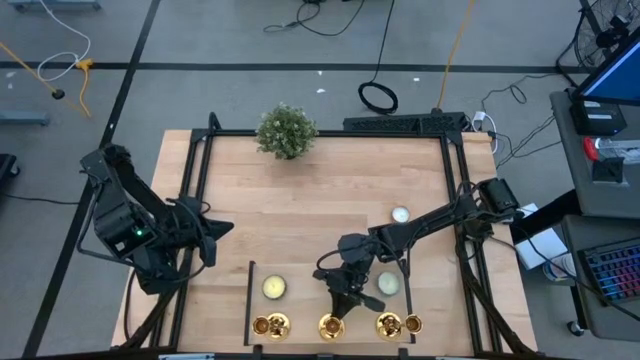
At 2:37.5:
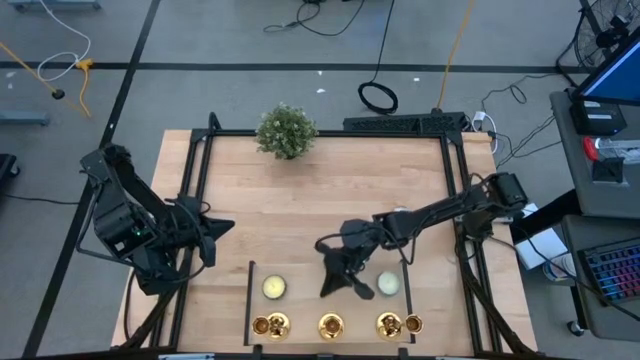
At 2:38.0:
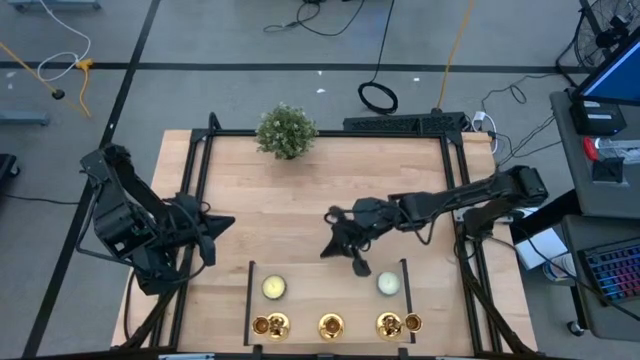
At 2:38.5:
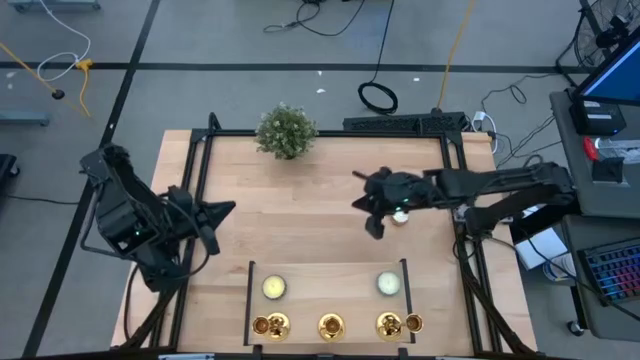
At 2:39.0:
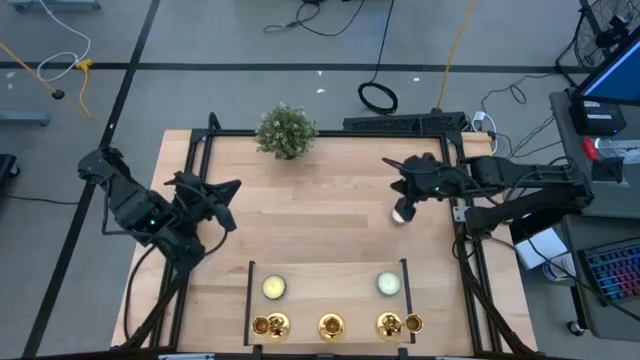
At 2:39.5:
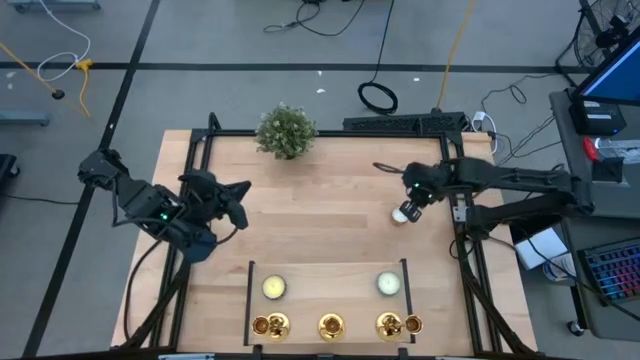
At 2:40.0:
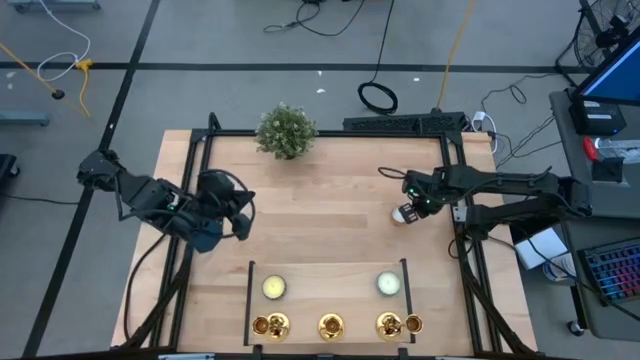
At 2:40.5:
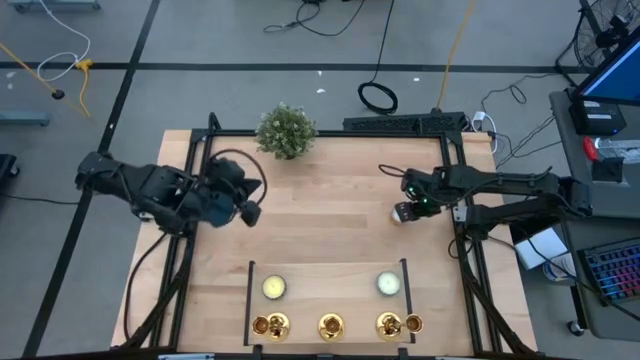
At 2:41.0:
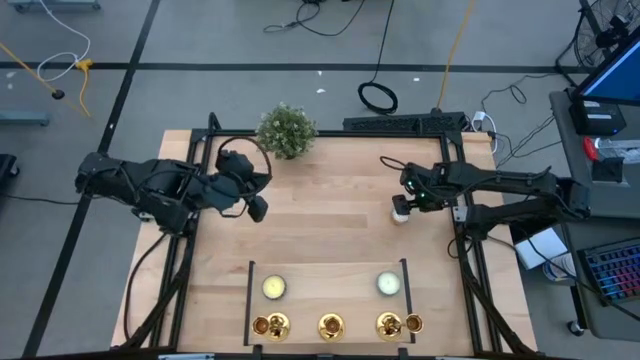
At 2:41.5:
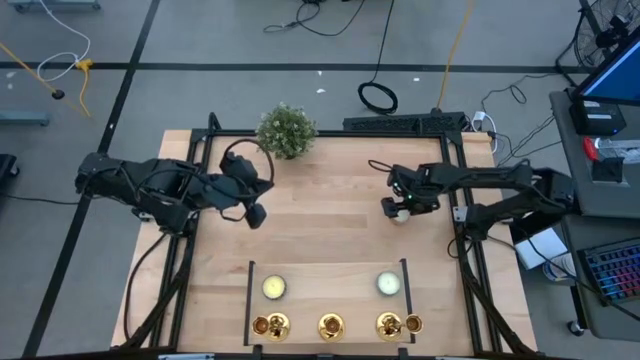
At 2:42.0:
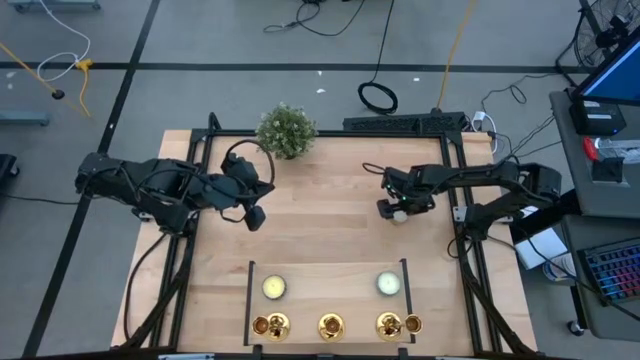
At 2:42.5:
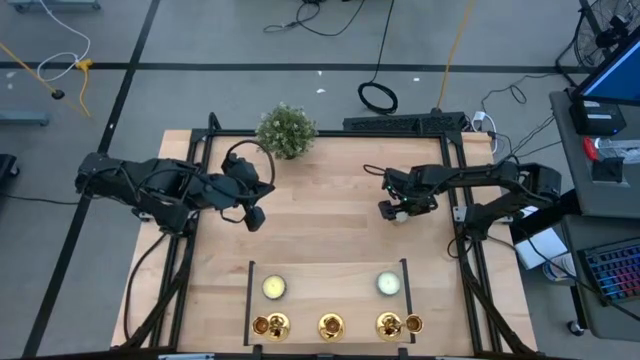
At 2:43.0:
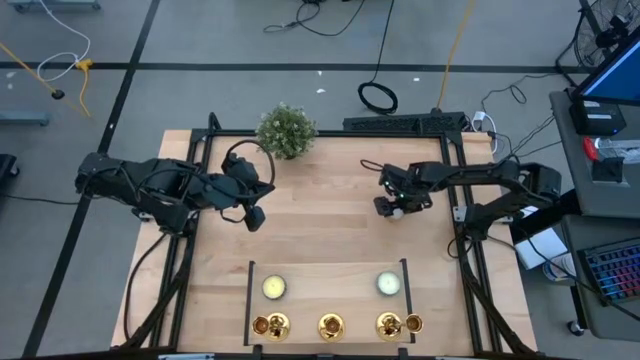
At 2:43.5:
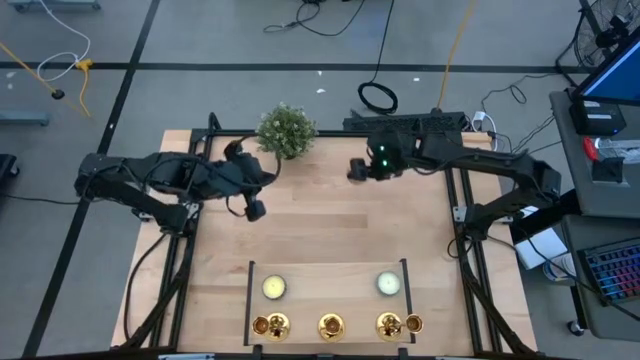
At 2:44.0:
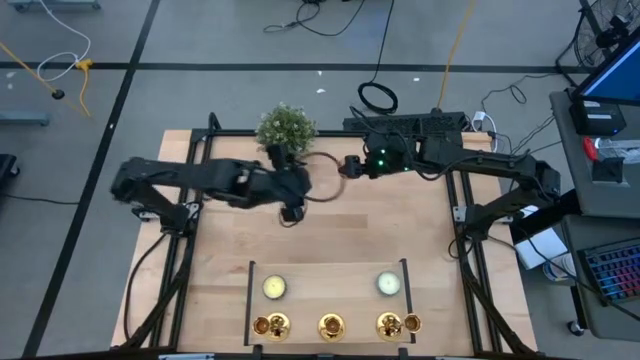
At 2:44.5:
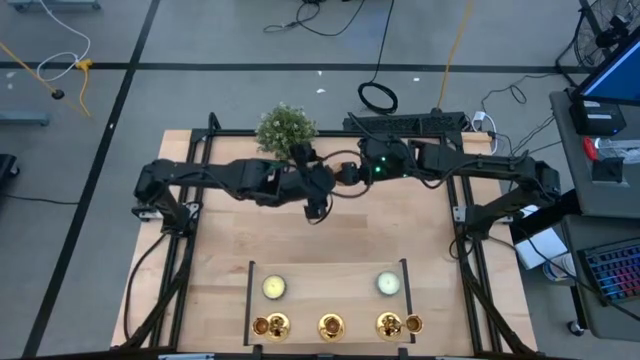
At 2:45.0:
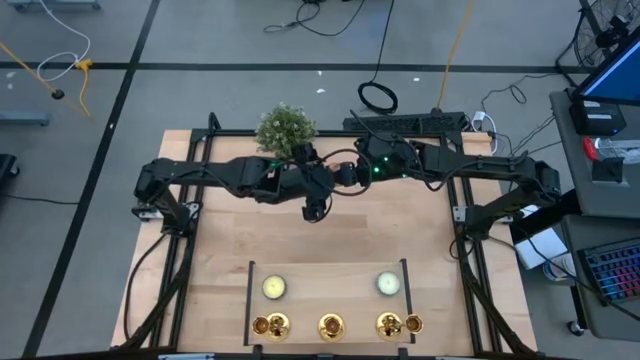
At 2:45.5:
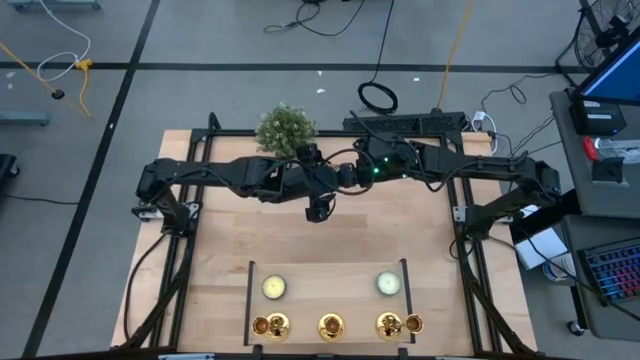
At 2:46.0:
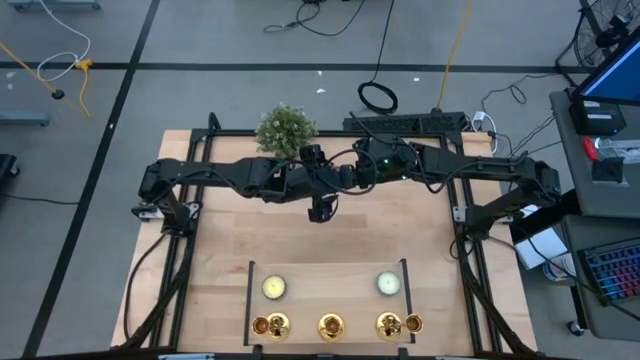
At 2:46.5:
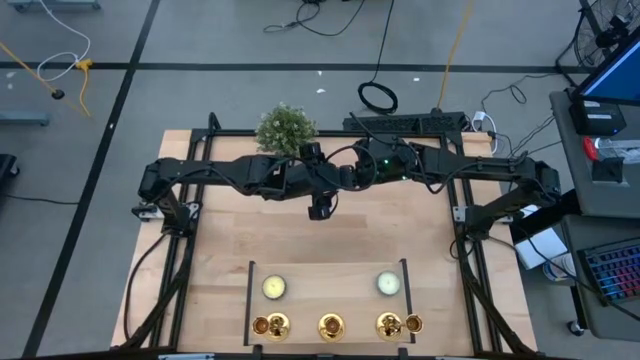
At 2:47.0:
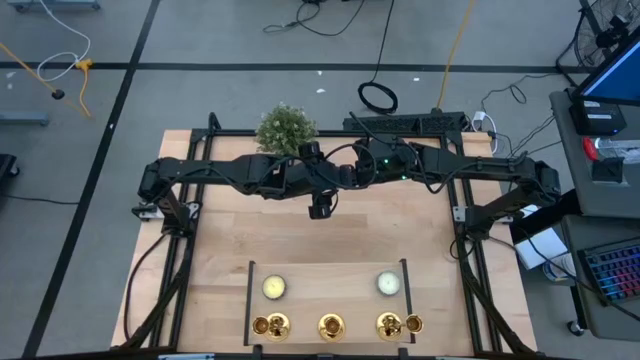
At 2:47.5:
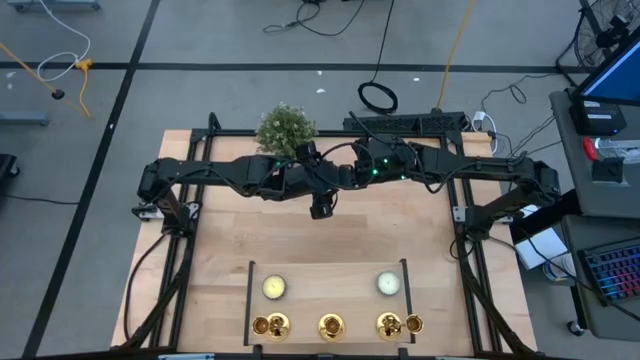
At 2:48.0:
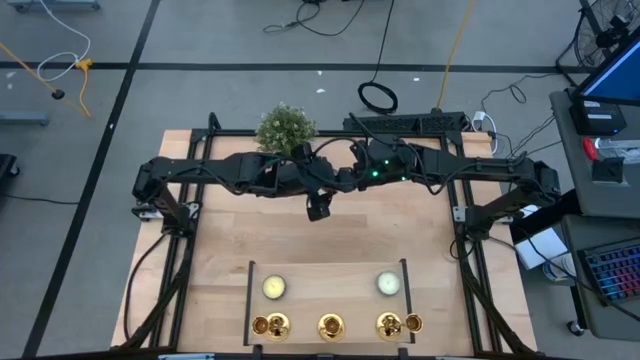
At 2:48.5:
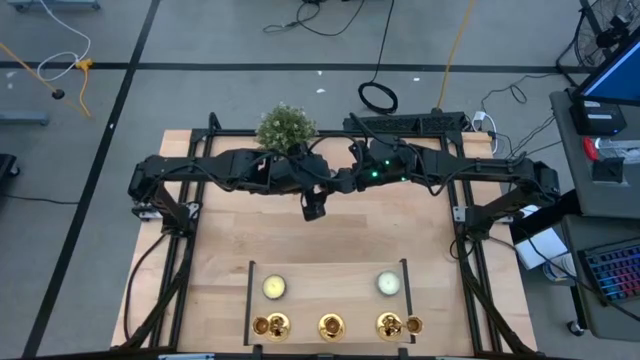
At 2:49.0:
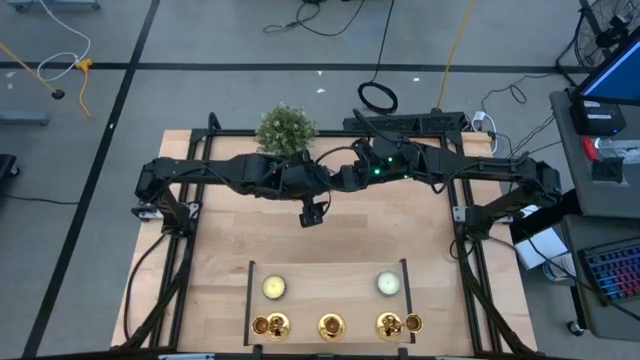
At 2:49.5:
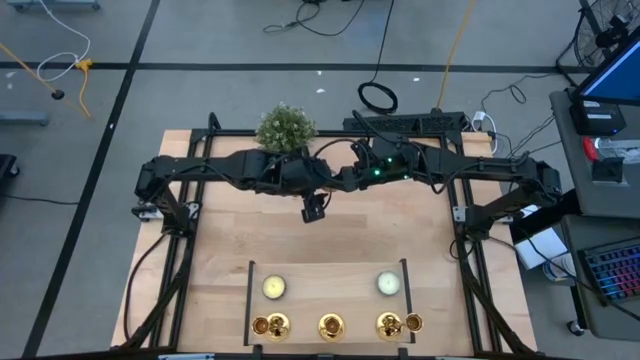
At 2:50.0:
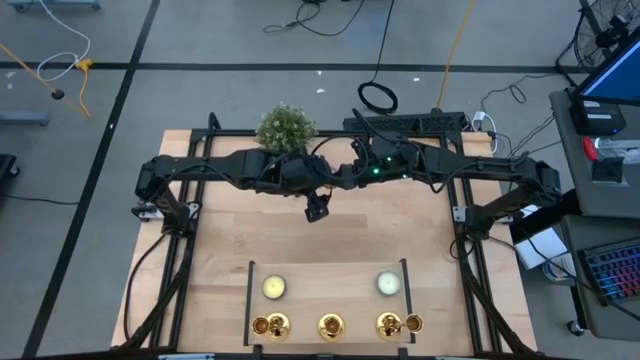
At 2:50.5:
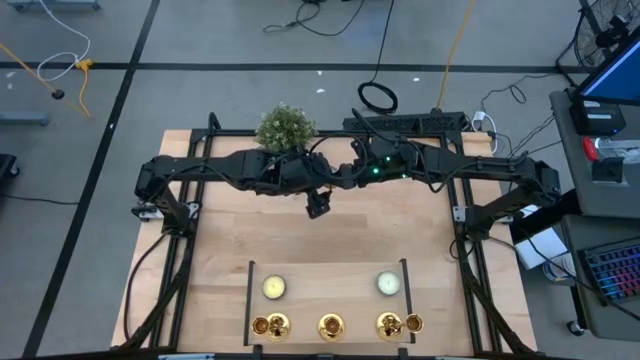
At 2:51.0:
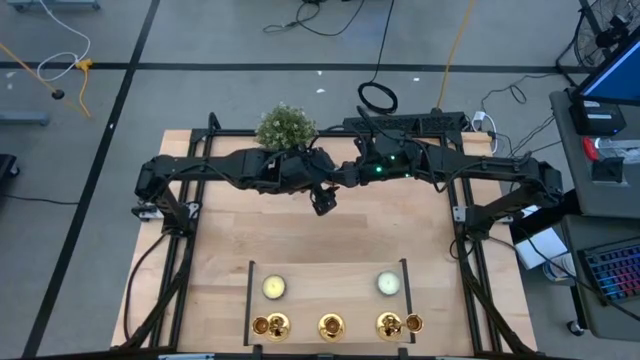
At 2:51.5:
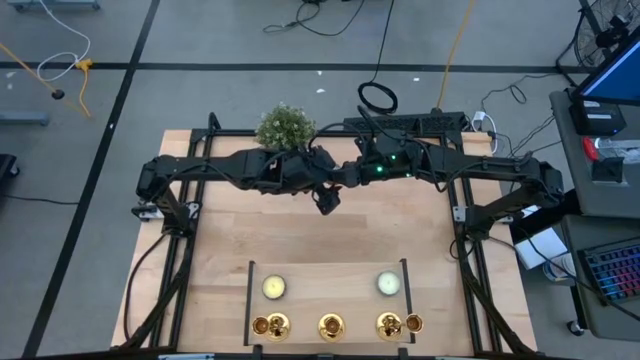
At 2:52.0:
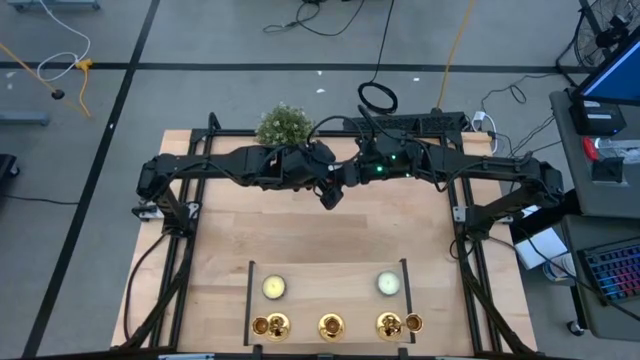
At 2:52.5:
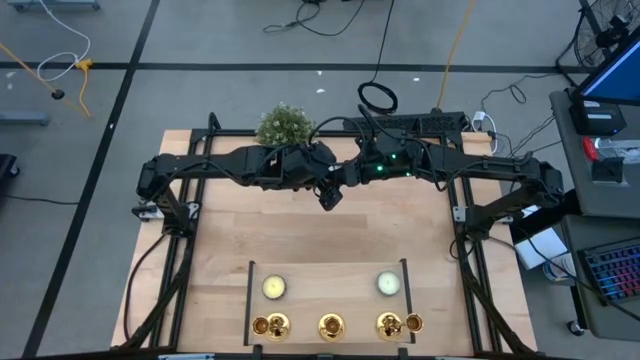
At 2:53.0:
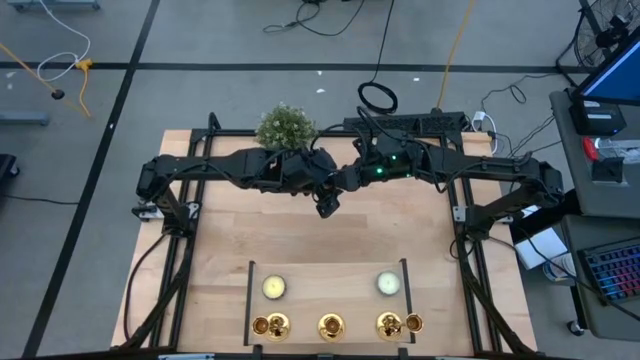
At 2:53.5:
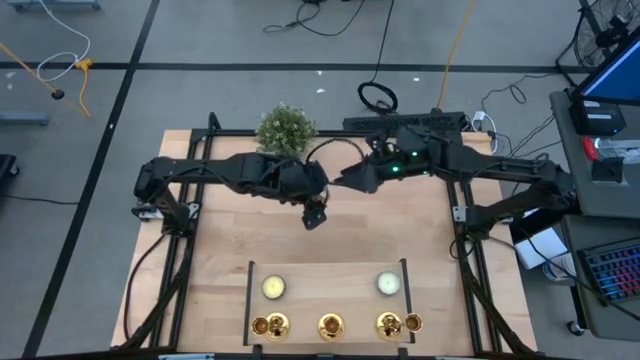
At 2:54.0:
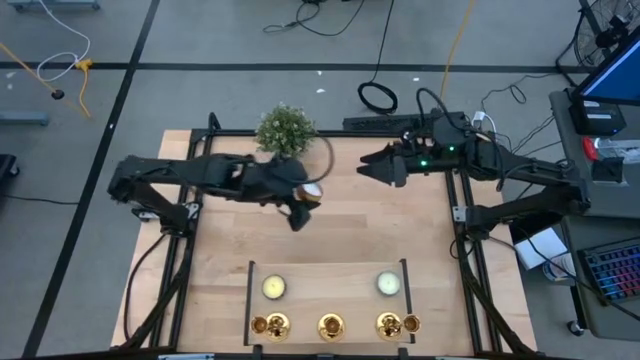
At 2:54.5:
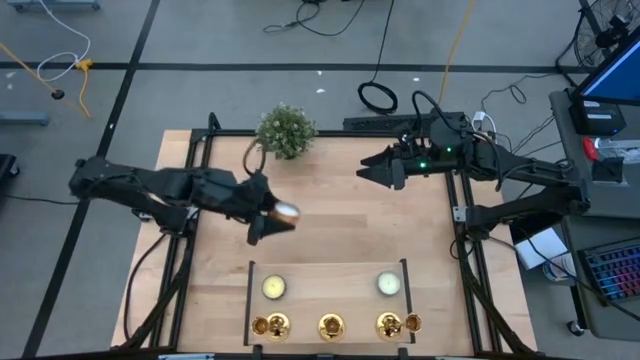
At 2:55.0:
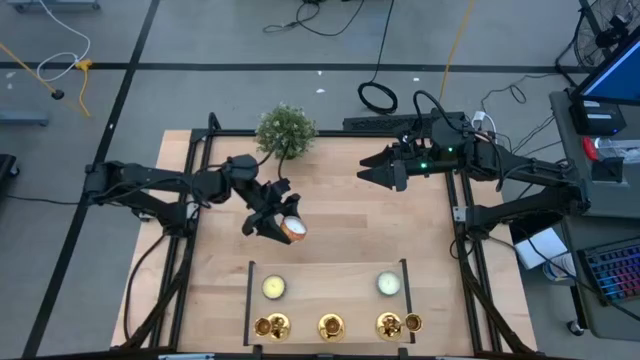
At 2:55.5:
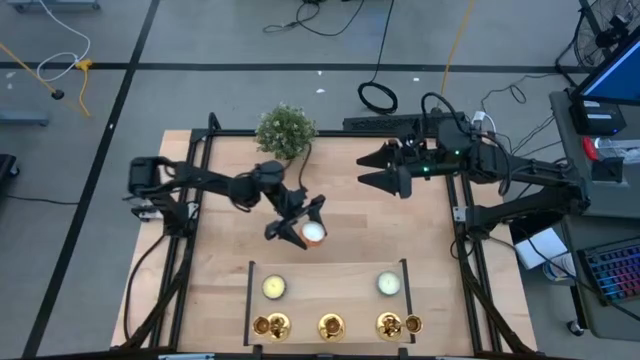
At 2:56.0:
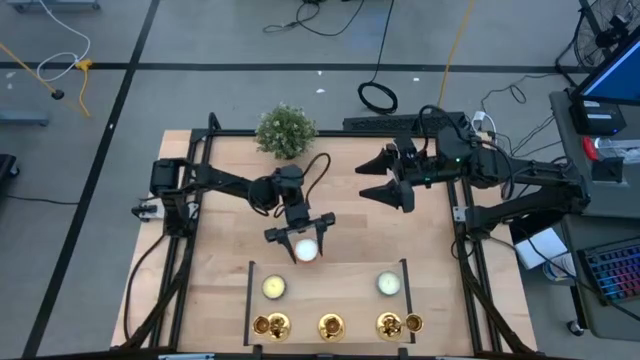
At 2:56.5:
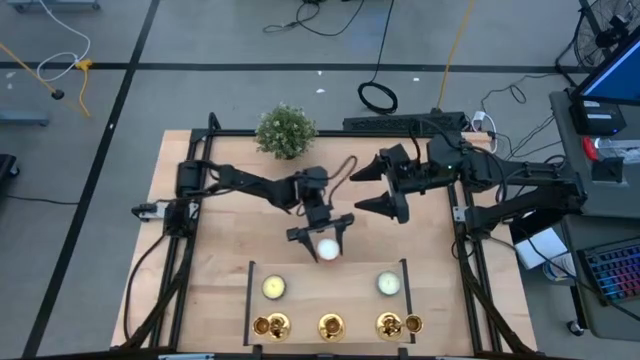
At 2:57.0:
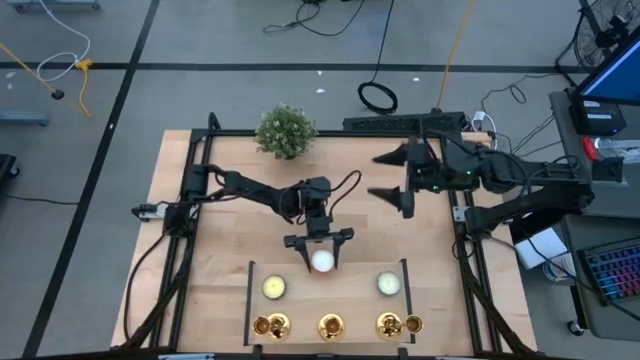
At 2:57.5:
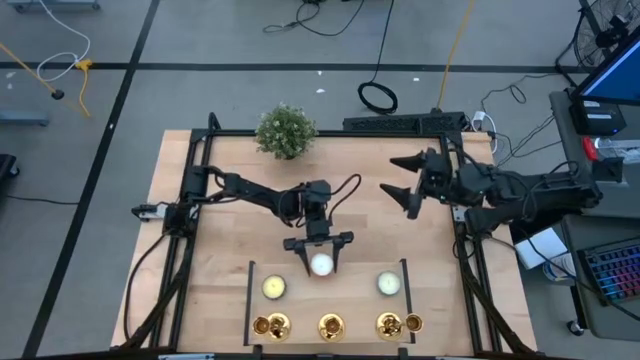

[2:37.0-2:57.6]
Task: Pick & Place candle stick holders
Put the yellow patterned scented candle on the shelf

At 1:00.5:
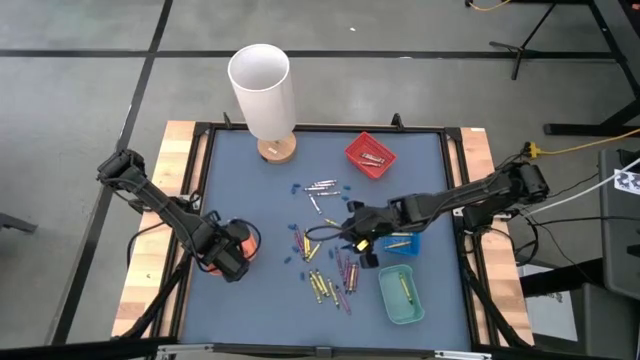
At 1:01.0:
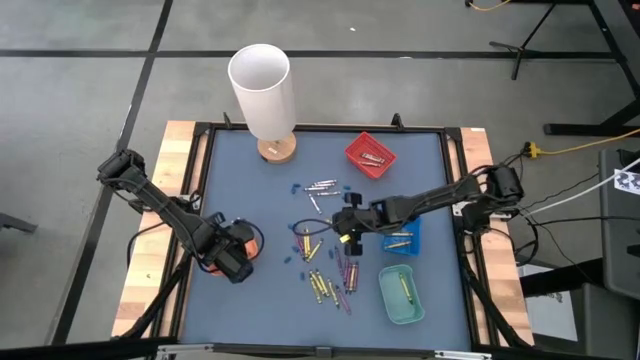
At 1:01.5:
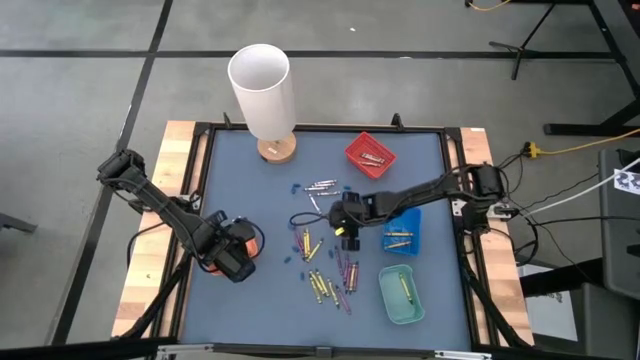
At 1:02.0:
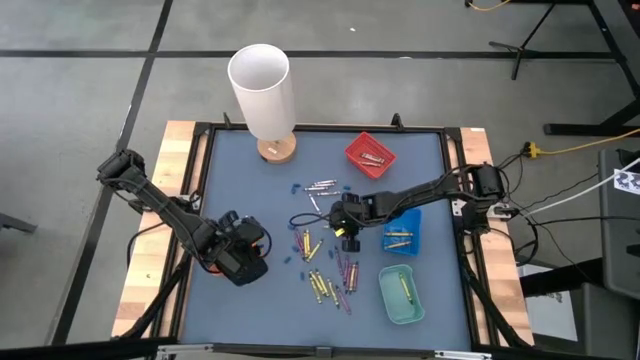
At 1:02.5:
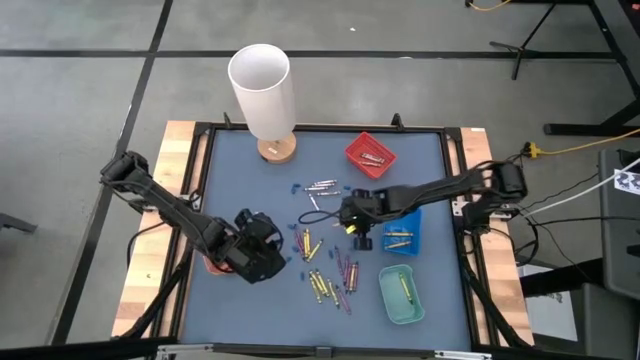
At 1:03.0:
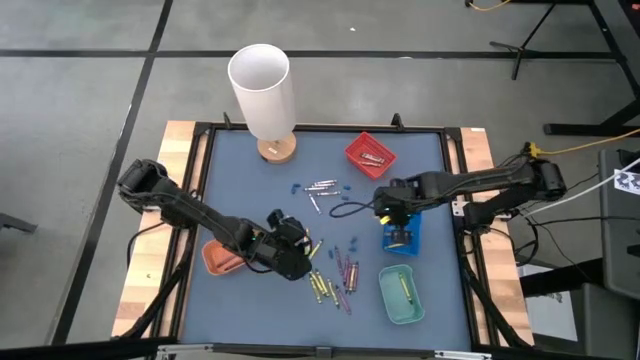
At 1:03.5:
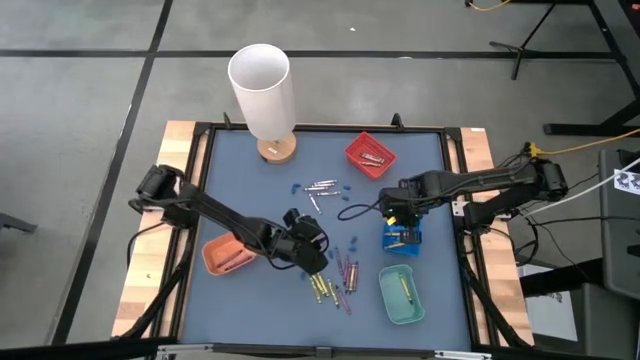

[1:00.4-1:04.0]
Task: Sort crayons
Put the yellow crayon into the blue bin
